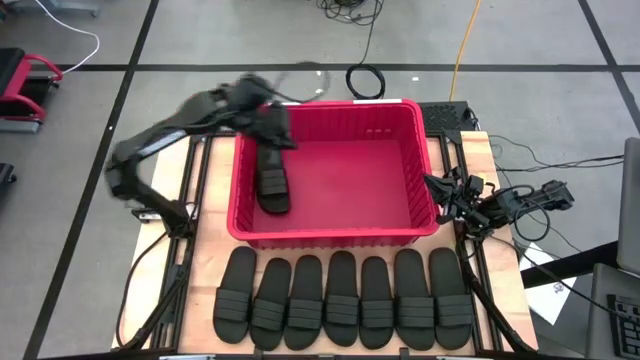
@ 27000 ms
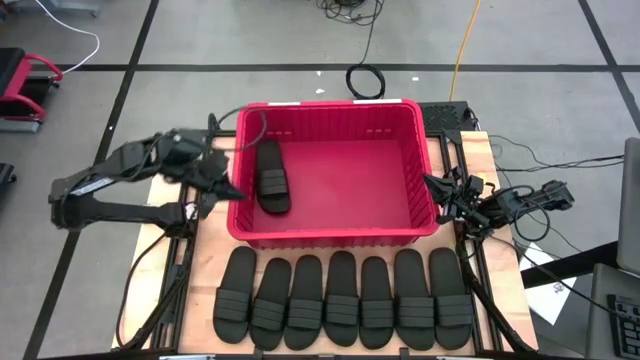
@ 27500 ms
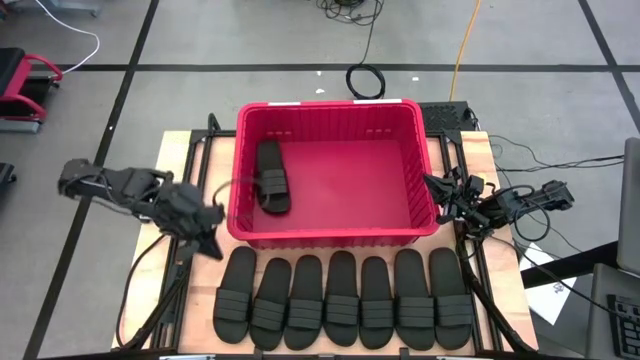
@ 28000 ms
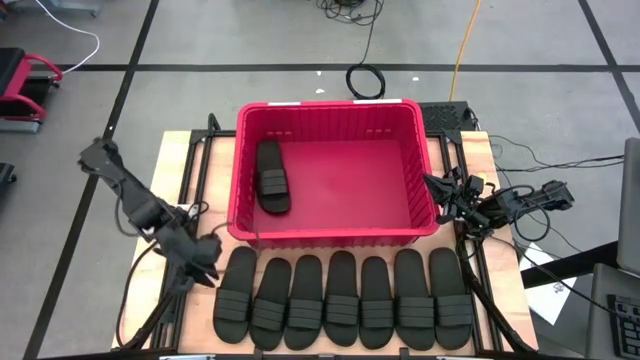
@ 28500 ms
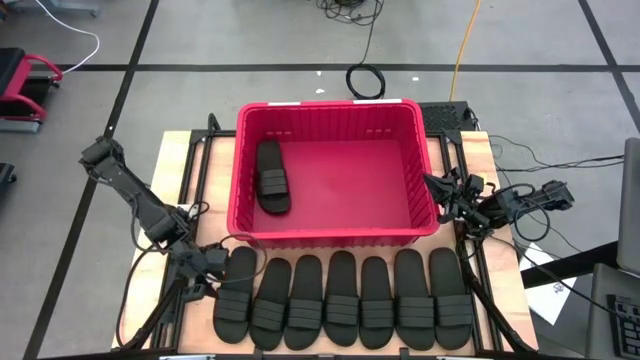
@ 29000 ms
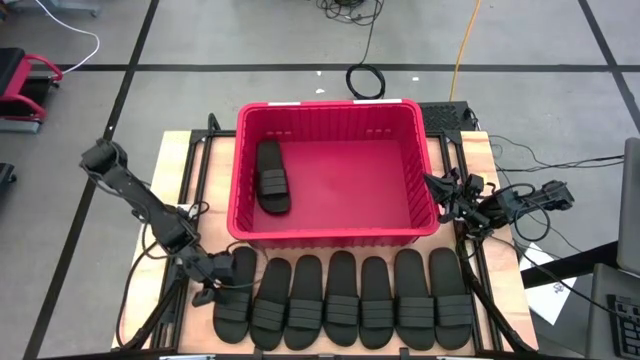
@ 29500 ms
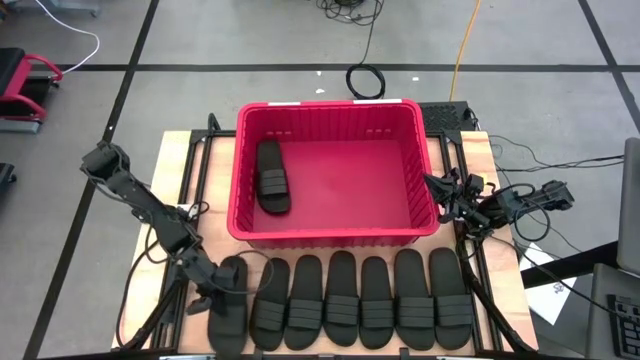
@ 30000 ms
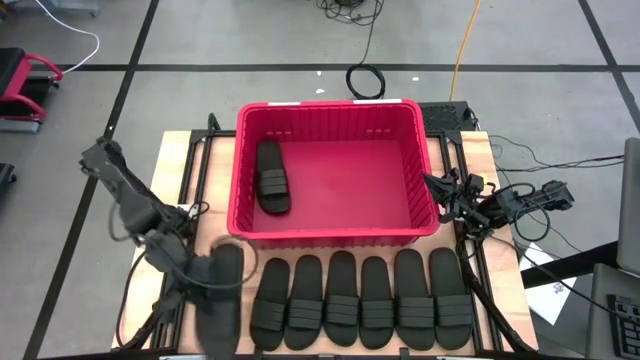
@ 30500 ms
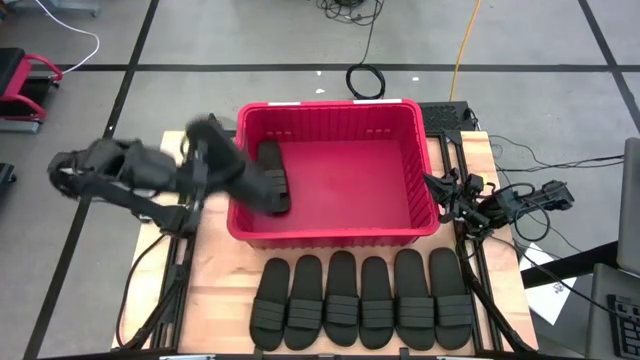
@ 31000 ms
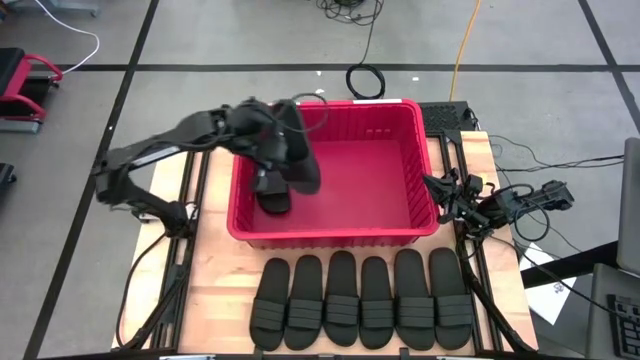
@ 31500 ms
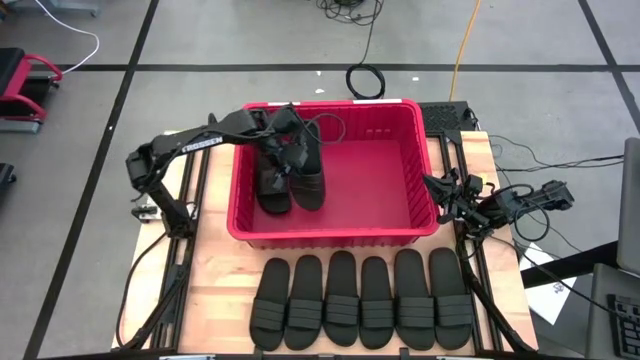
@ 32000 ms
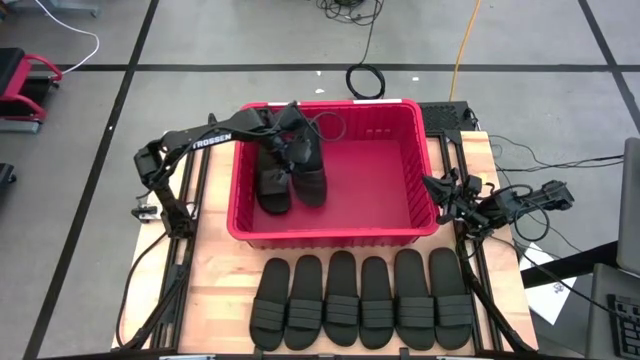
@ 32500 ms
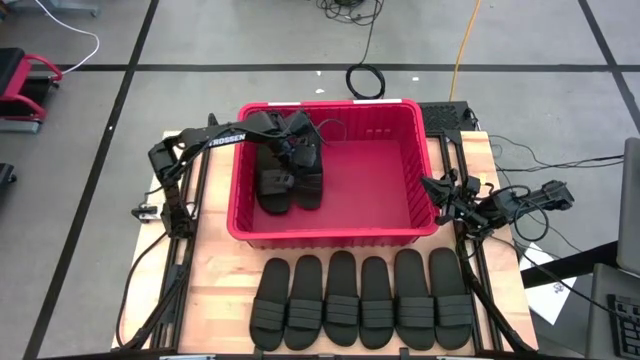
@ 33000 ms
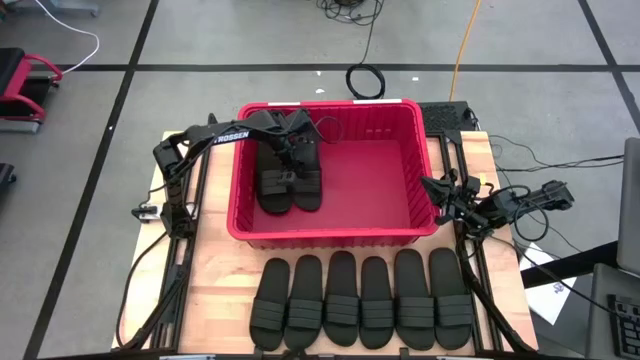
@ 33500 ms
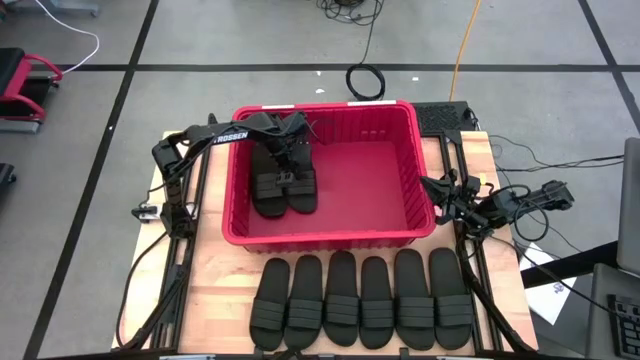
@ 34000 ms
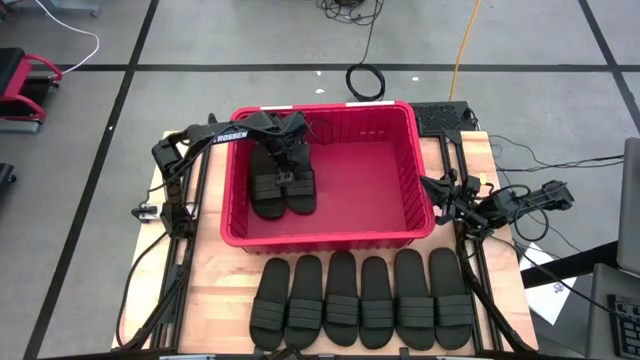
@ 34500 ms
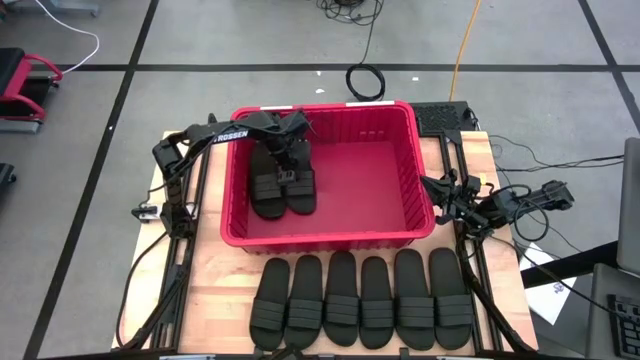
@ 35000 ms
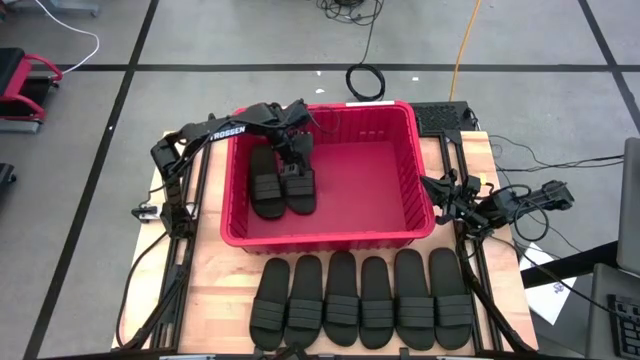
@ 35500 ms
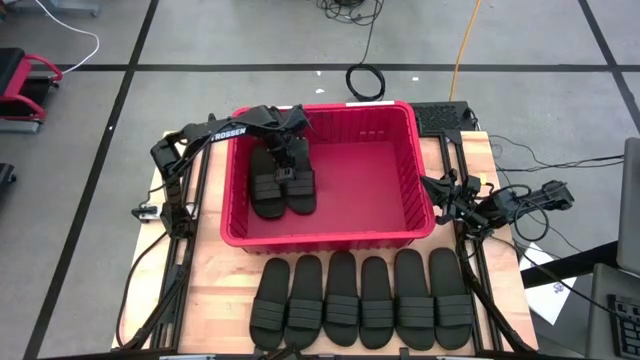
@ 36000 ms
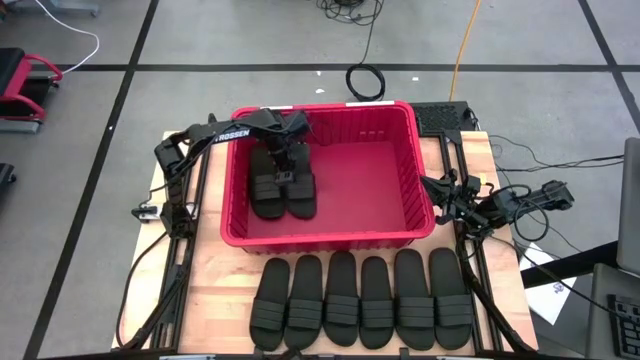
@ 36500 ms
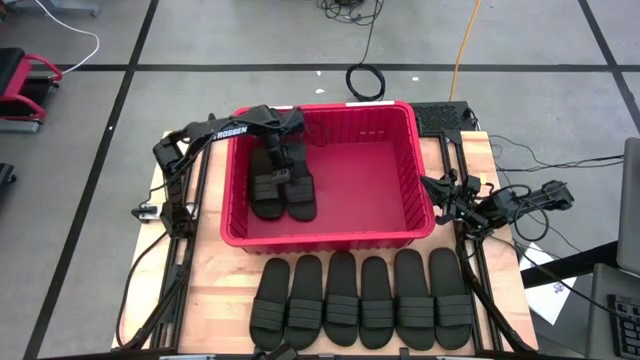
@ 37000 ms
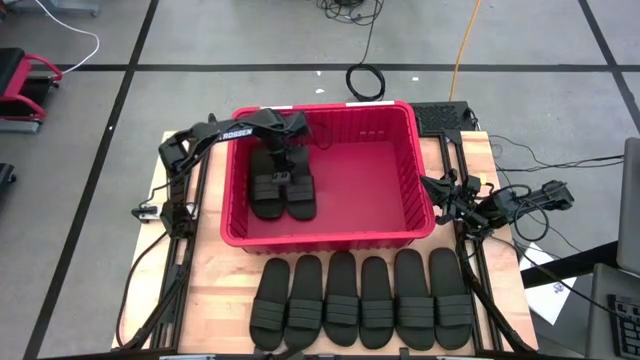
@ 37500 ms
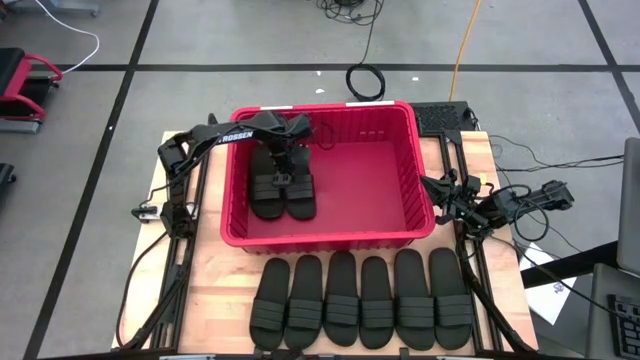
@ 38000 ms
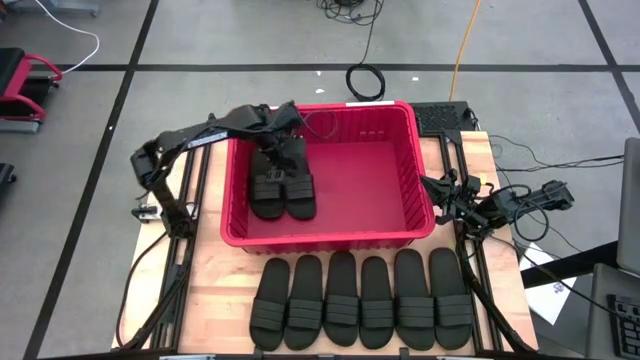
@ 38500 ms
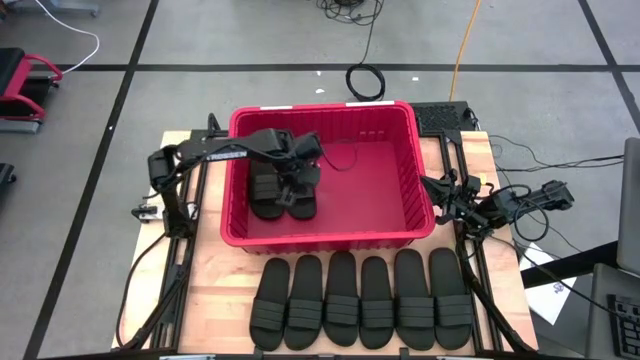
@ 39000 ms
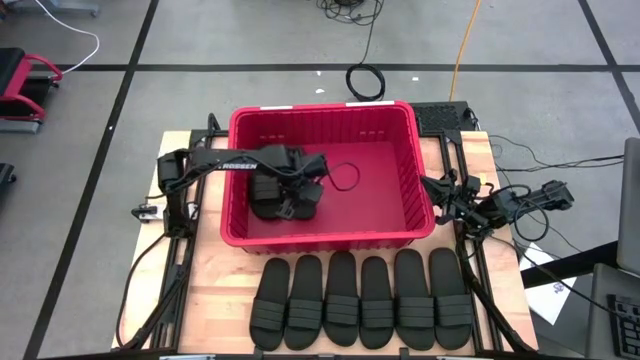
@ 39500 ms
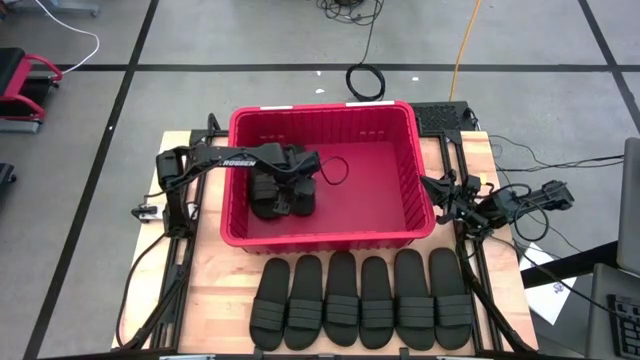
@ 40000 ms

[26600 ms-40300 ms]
Task: Pick and place slides into bin
Put the slipper into the bin

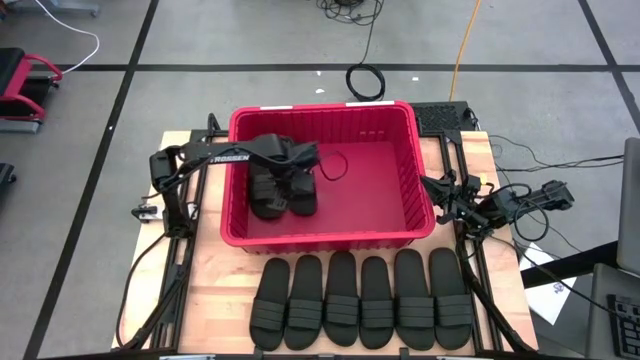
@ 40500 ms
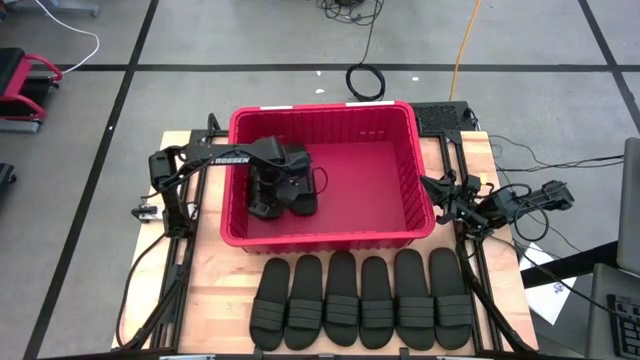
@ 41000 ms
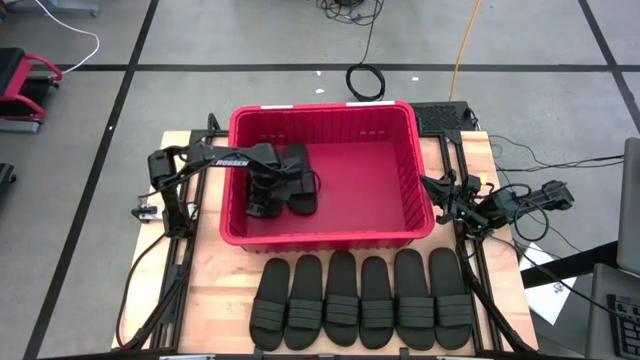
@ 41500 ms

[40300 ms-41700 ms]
Adjust the left slipper inside the bin

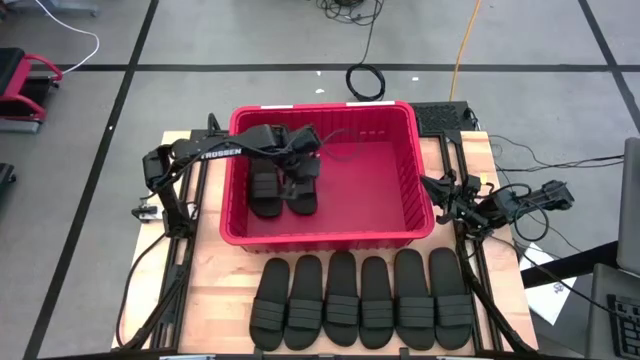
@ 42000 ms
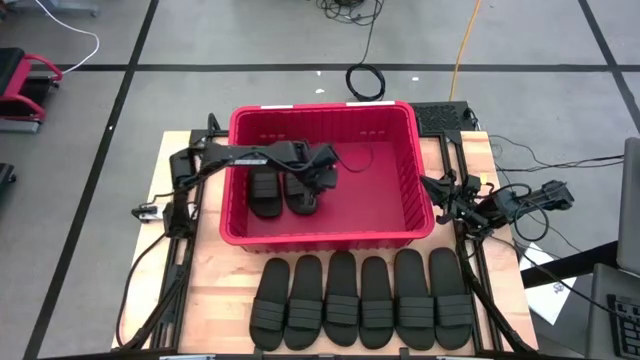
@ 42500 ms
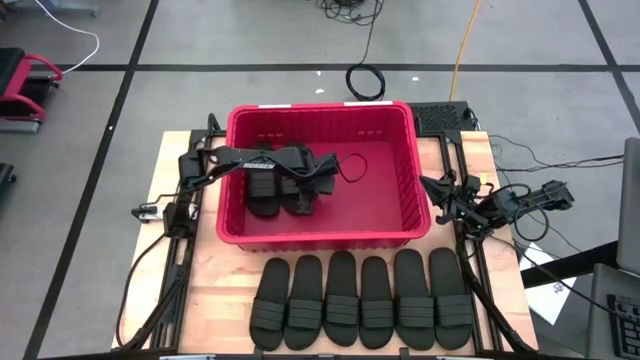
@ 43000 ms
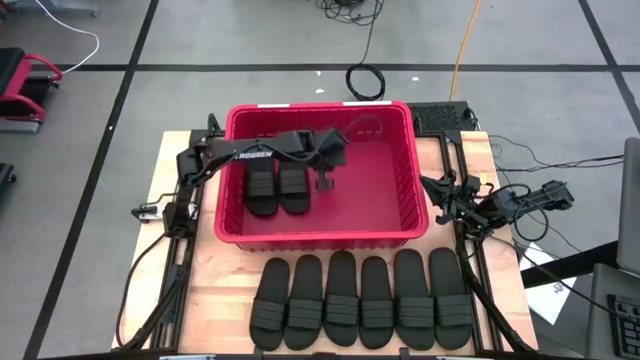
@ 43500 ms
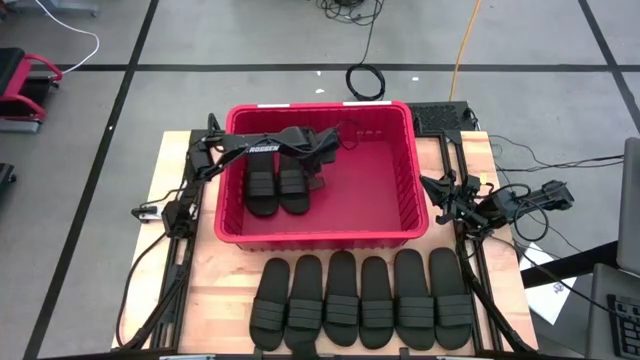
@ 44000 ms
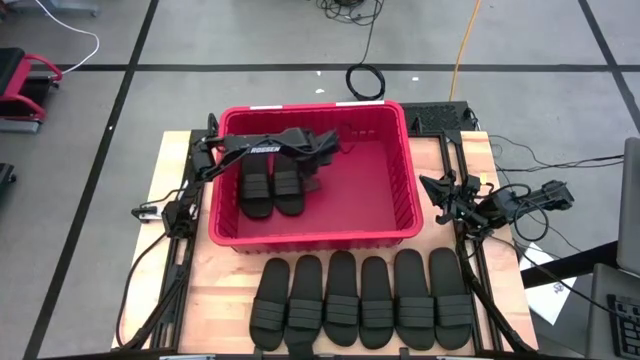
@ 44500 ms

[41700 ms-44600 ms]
Adjust the right slipper inside the bin

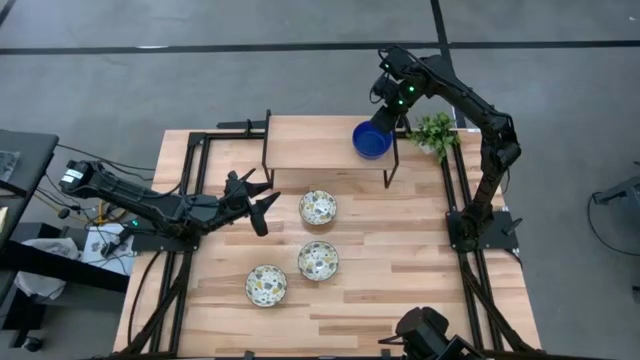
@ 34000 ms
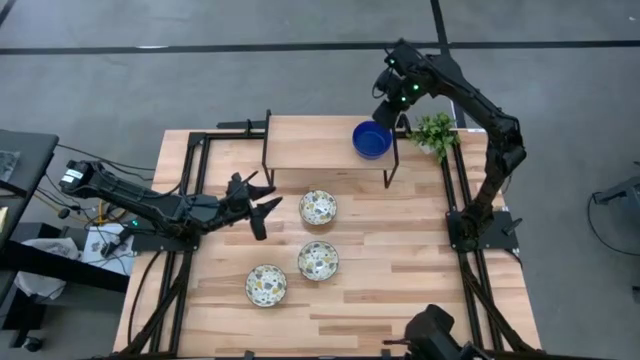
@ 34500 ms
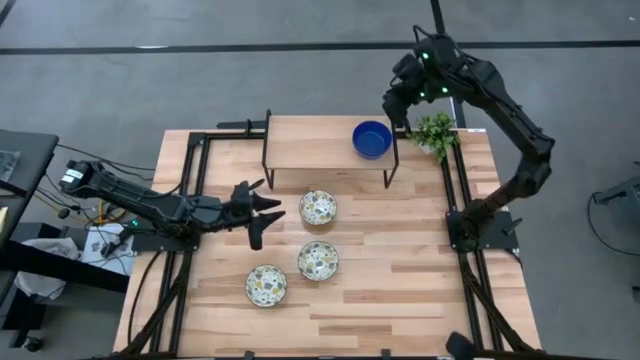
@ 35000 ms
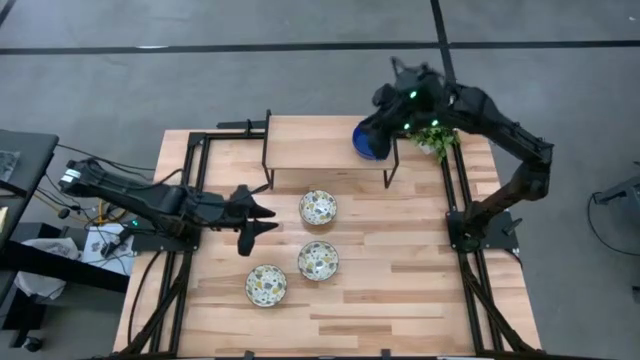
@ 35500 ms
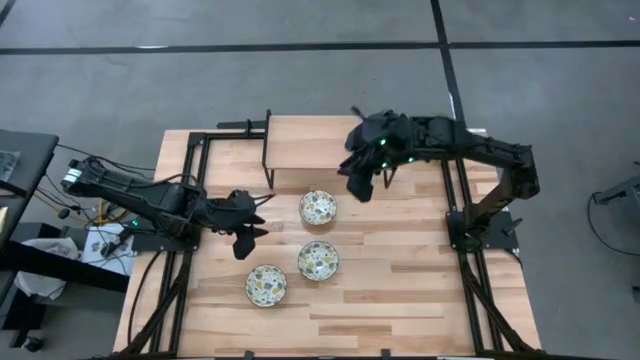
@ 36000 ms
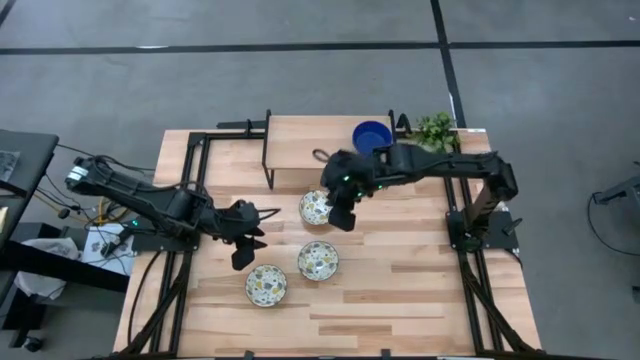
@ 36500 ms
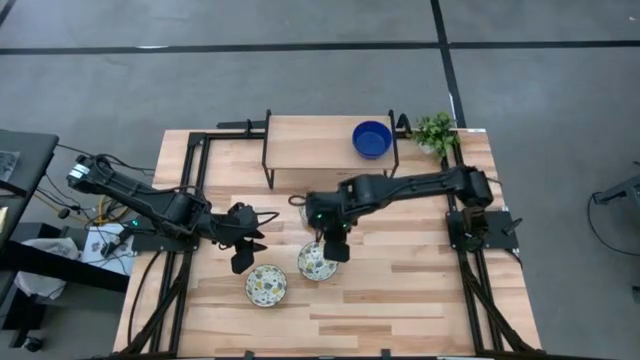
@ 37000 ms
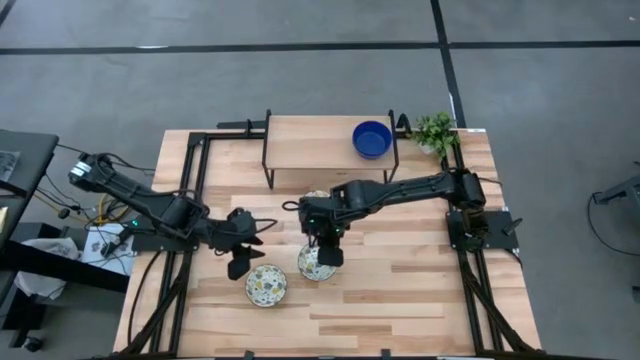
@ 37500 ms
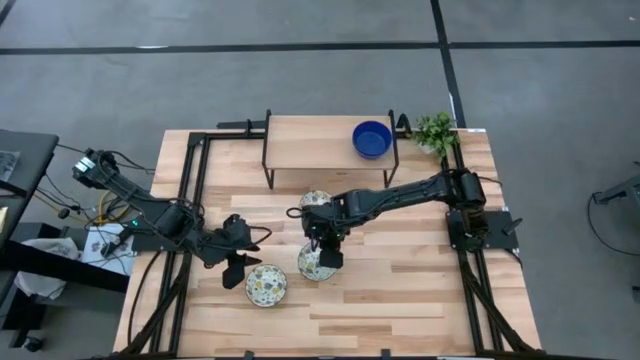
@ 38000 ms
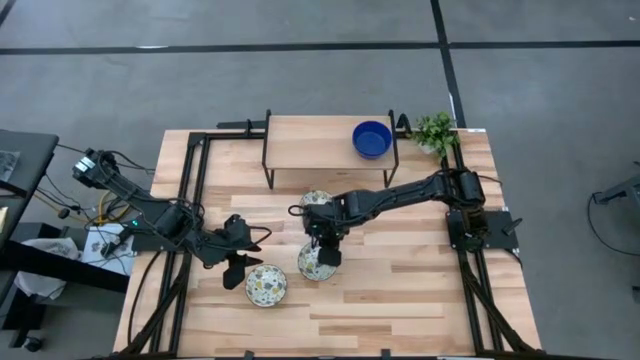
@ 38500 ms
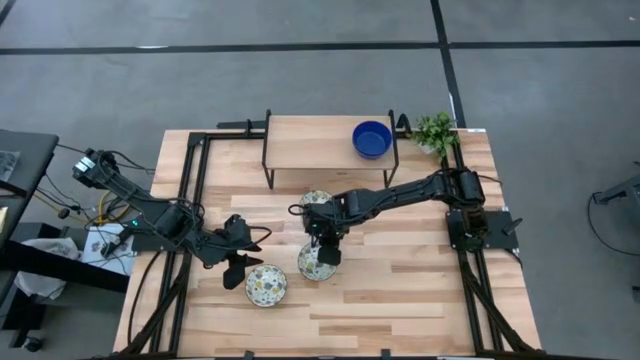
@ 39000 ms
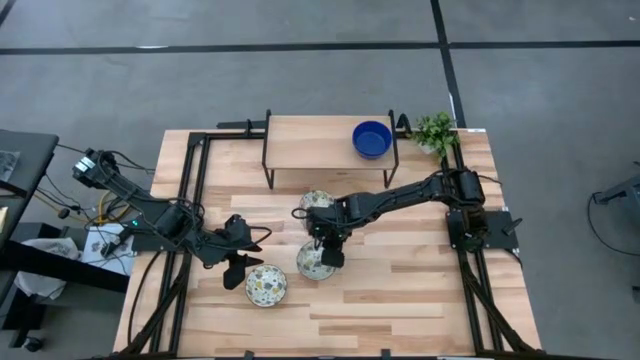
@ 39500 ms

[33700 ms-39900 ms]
Task: Pick & Place Mini bowls
Put the middle white patterned bowl on the shelf
